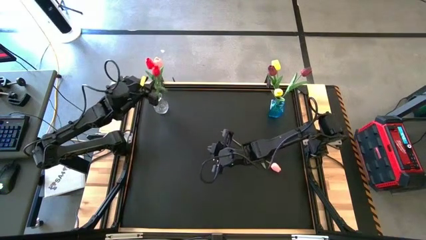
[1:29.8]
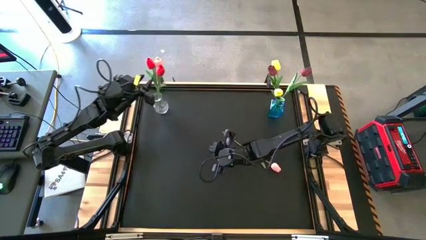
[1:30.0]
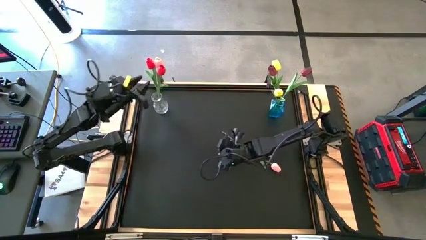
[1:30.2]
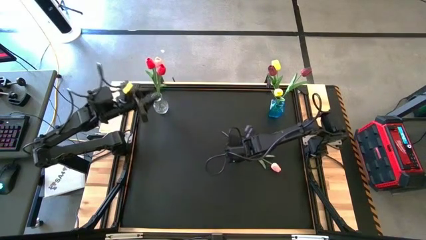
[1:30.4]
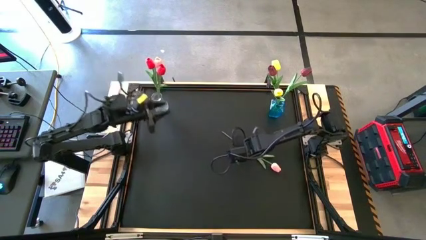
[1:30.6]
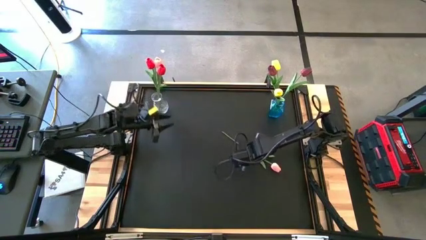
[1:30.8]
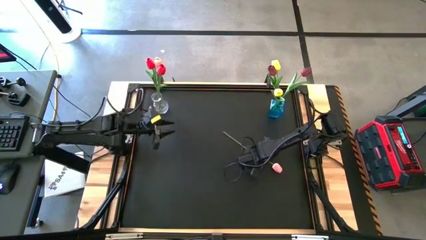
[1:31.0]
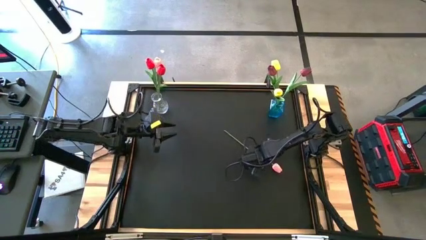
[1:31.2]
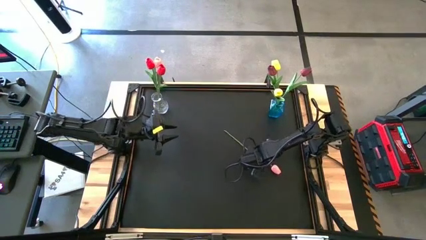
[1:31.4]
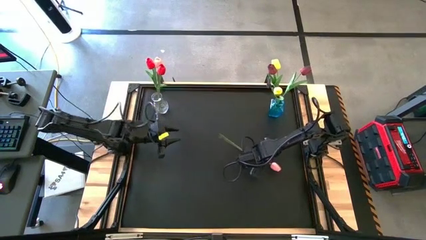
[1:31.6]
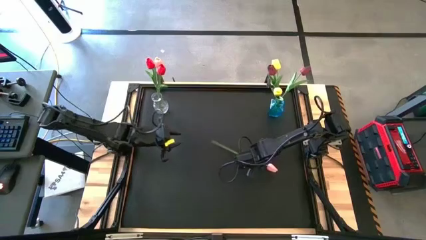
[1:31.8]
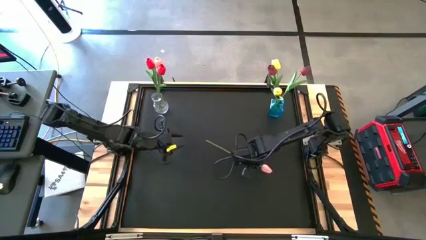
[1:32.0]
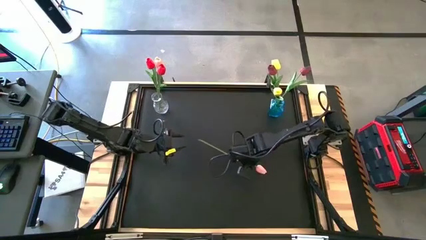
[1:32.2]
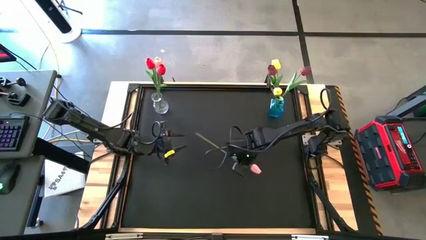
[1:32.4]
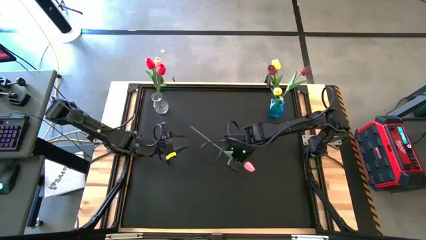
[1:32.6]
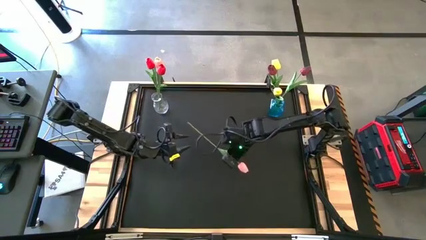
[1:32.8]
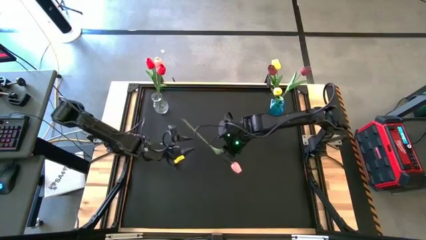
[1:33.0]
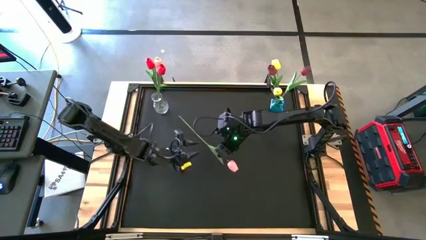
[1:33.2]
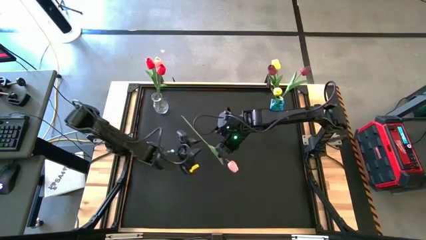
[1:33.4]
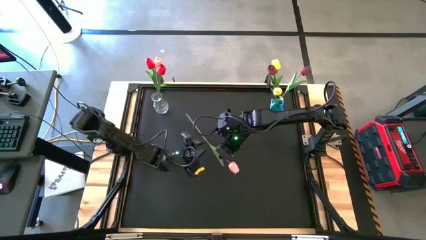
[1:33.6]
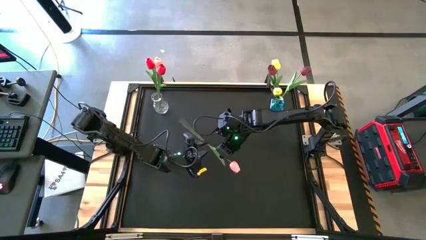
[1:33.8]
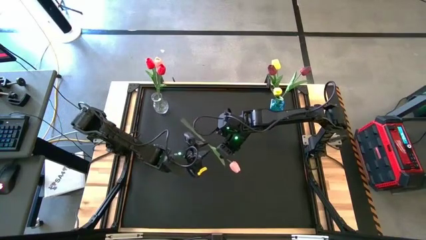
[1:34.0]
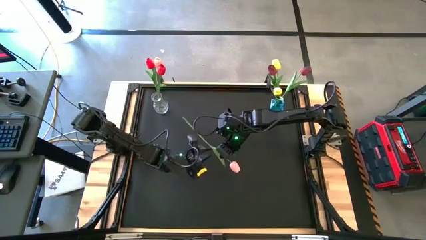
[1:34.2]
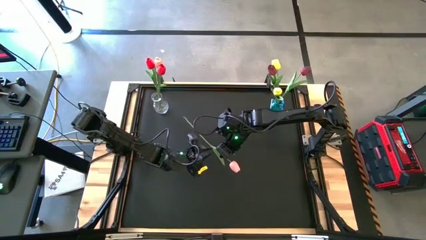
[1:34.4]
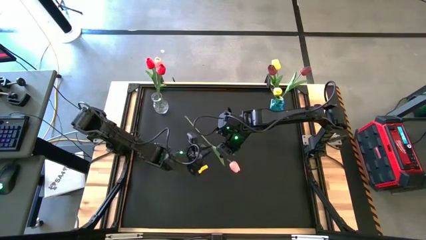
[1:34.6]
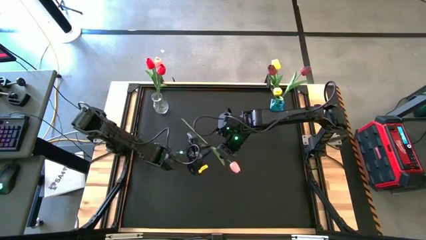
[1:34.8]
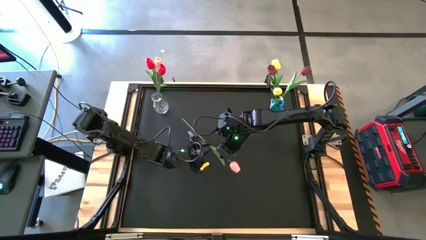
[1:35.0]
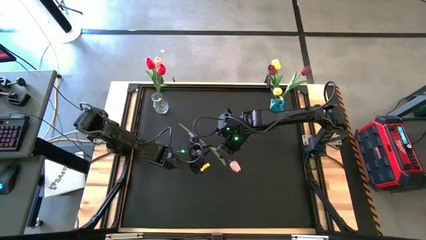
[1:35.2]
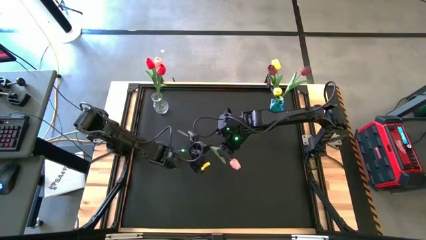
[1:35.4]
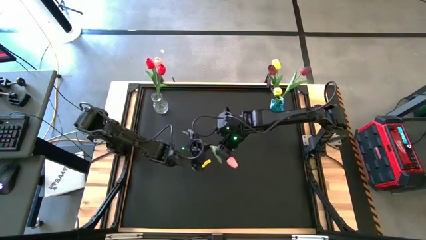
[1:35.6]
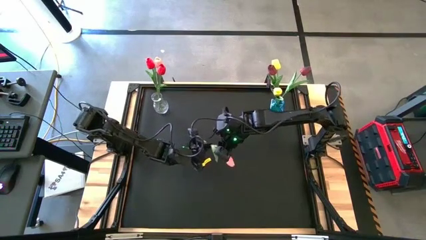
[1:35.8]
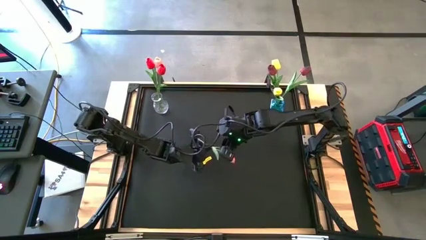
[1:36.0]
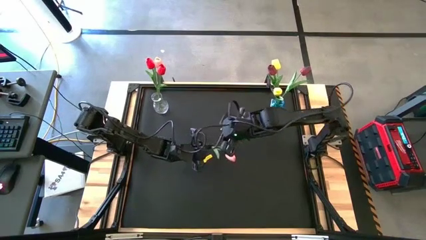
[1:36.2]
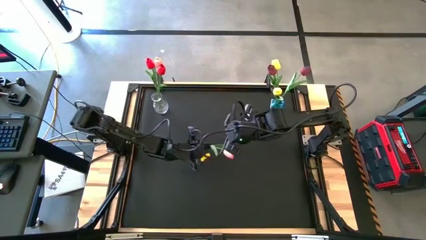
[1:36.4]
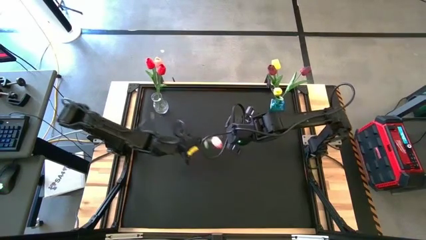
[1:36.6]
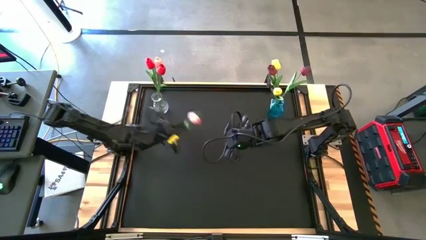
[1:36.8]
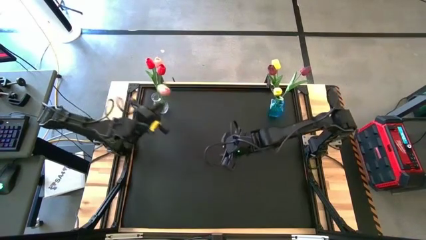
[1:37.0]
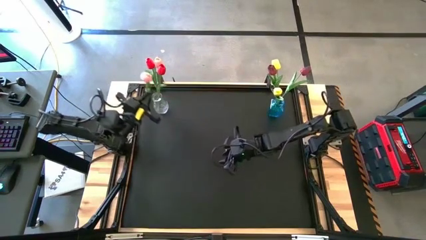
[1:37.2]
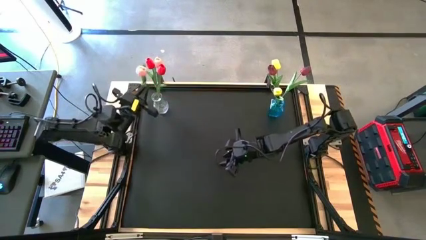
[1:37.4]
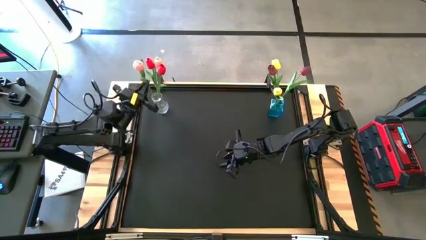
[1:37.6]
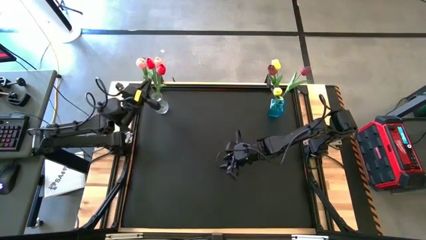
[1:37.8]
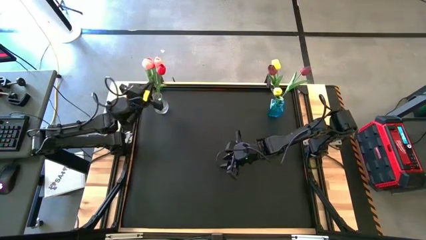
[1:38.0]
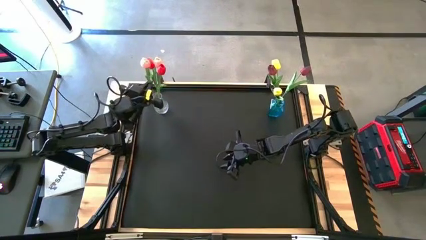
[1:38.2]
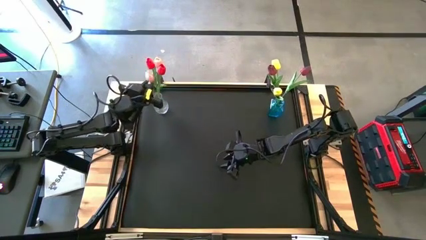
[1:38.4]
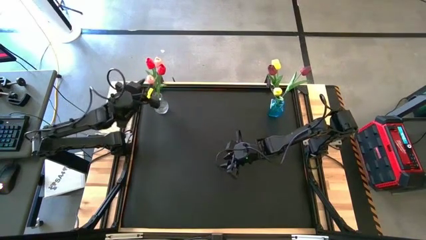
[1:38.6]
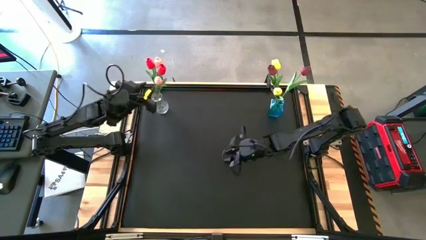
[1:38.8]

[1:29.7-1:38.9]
Task: Sort flowers into vase by color
Put the pink flower into the transparent vase

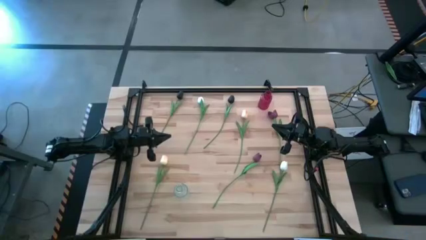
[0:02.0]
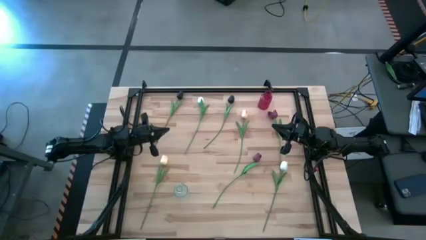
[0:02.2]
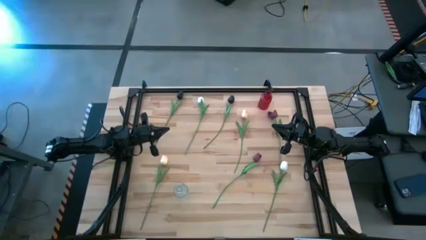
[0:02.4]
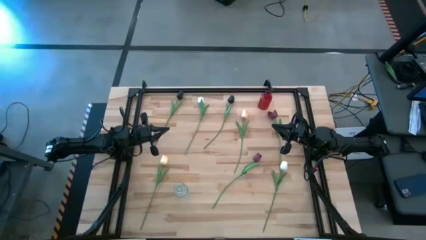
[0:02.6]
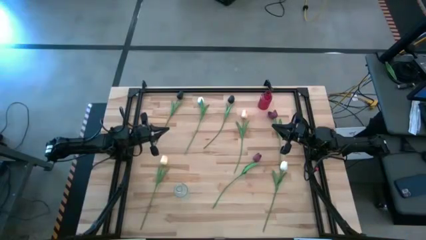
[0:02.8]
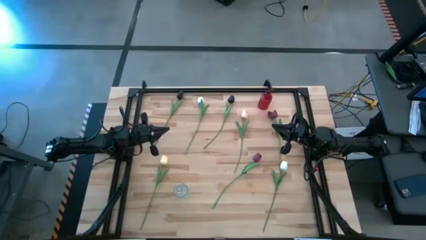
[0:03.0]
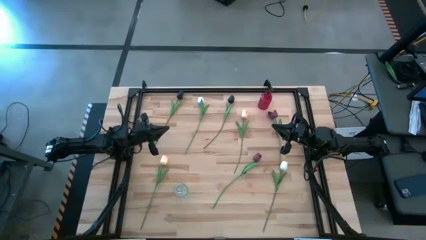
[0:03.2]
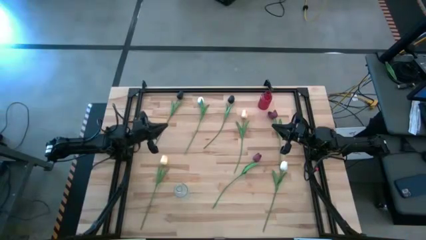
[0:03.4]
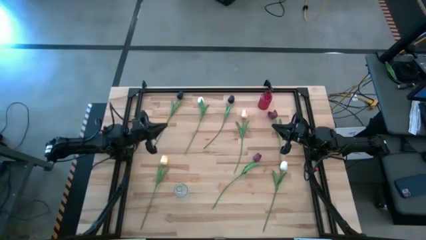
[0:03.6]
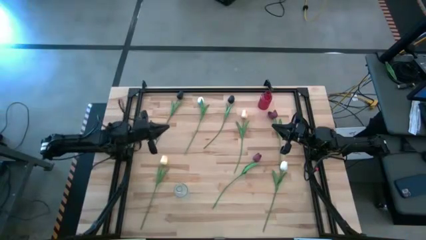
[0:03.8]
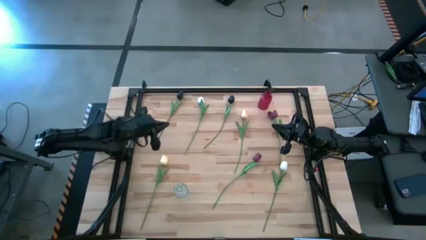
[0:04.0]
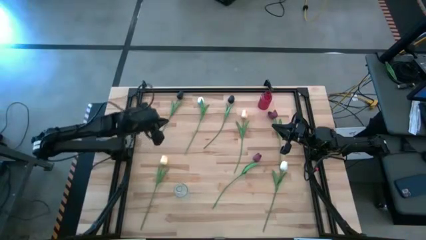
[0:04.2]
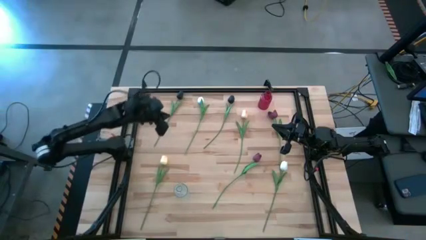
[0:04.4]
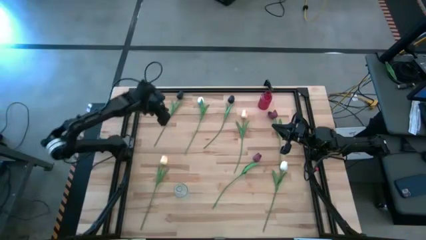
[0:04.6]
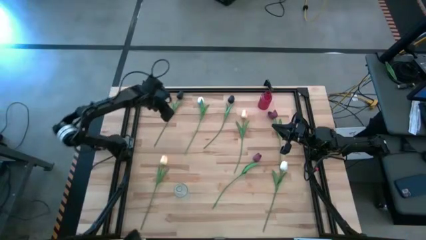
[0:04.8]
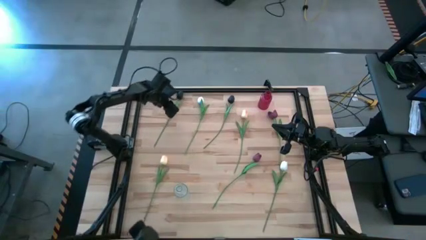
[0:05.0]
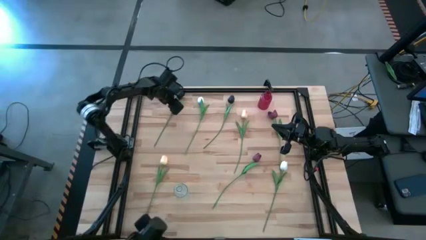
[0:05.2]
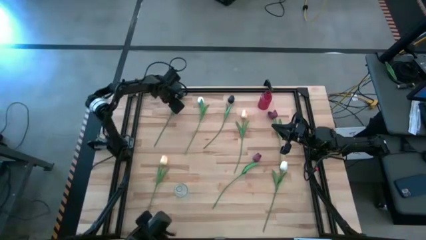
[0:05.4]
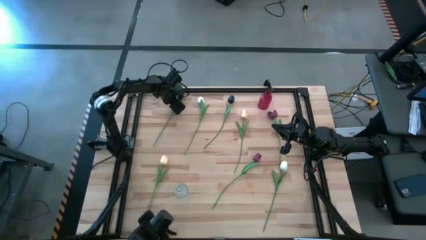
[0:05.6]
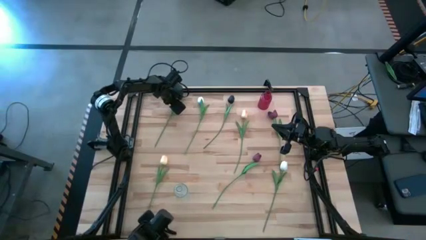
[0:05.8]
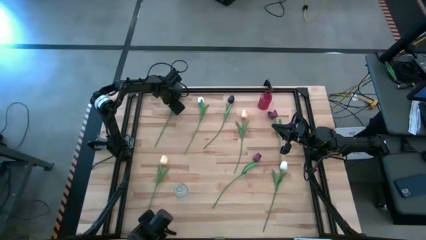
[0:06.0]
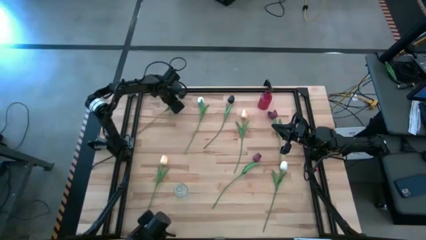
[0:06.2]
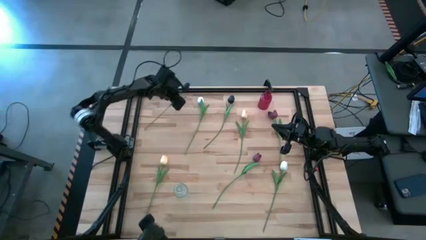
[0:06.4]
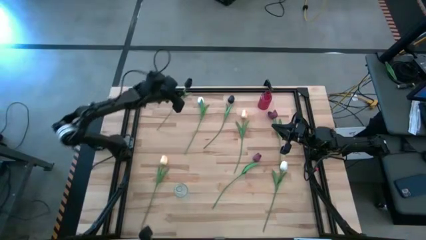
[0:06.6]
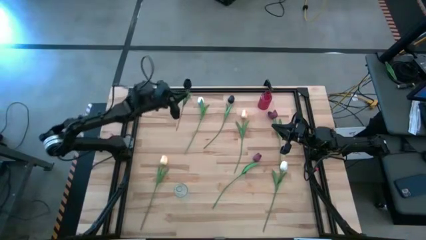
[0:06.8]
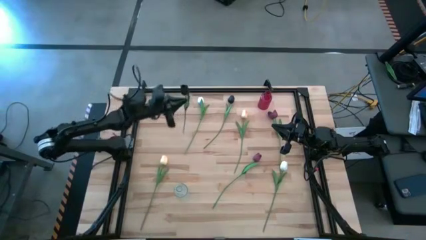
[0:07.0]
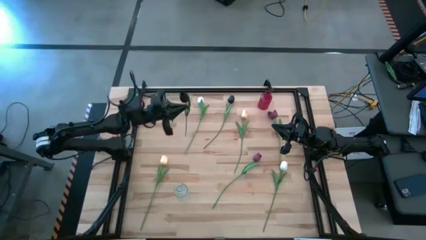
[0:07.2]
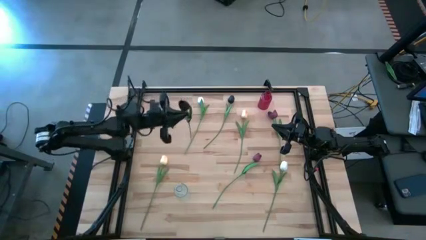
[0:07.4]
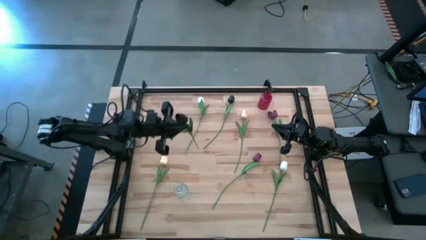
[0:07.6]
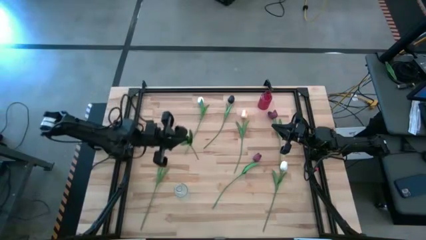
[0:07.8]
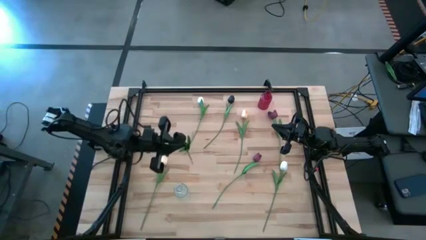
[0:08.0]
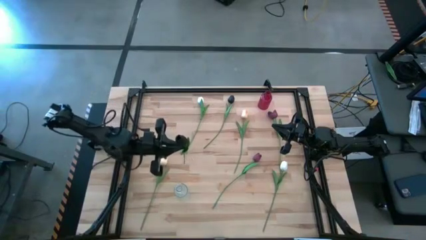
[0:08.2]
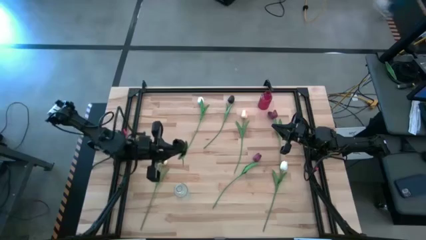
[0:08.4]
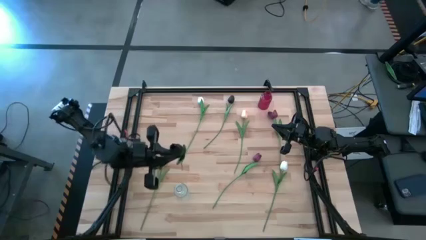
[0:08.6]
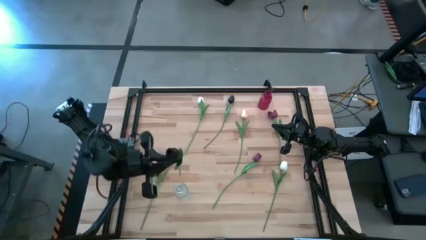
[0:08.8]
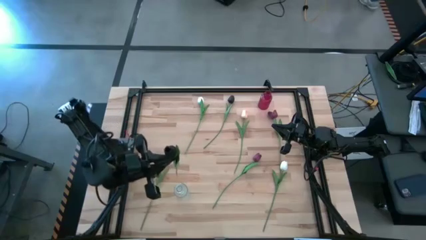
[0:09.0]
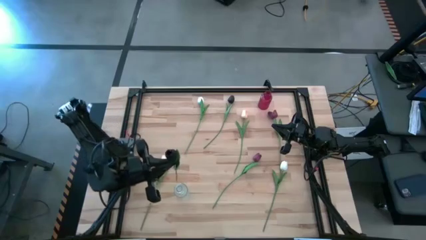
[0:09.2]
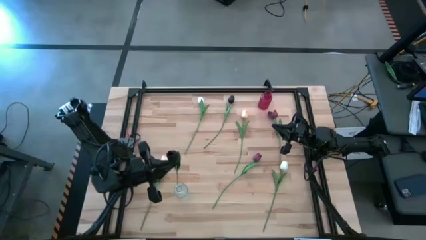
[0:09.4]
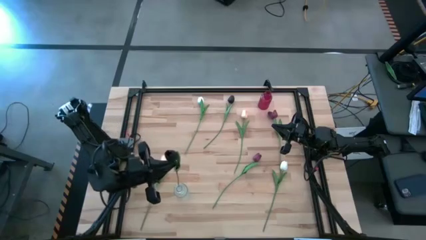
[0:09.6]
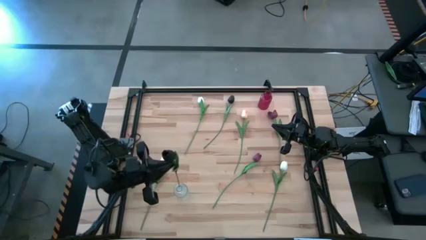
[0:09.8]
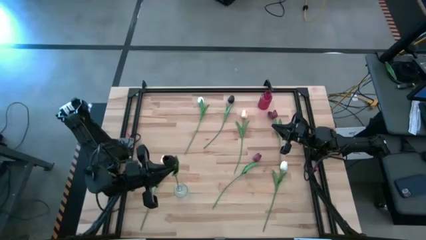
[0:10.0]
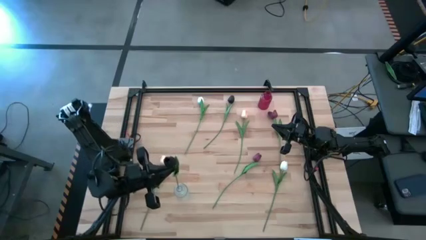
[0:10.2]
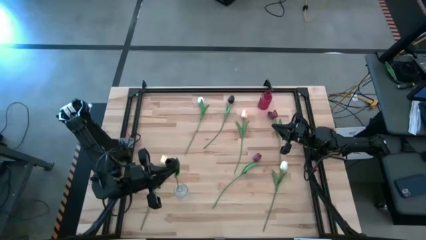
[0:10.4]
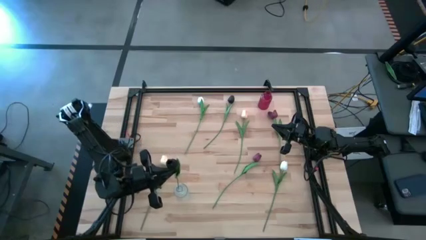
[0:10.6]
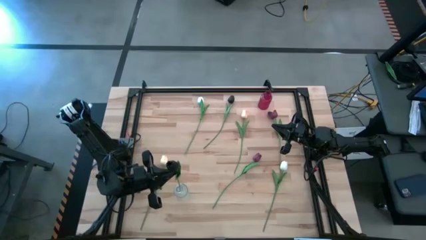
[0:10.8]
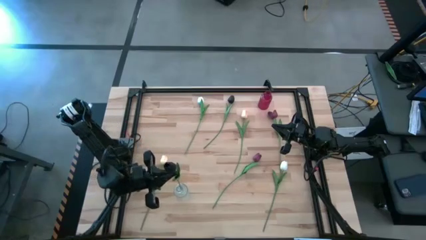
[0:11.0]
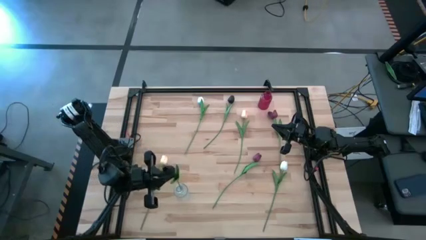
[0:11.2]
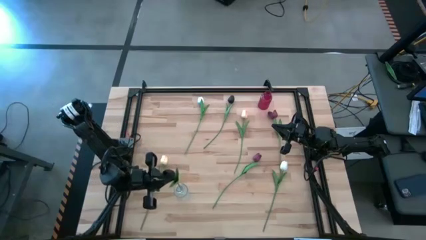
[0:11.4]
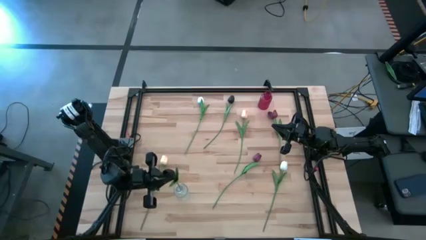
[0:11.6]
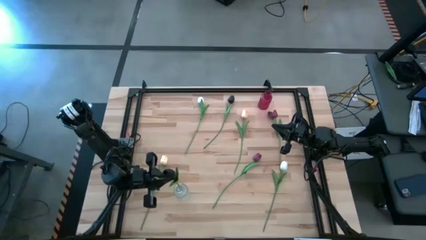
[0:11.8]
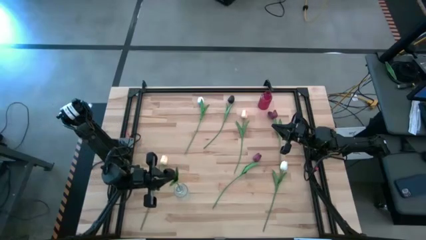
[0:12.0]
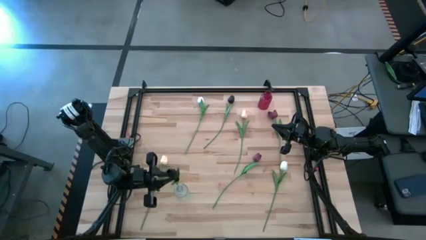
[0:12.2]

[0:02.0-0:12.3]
Task: Sort flowers into vase by color
Put the left black flower into the transparent vase
